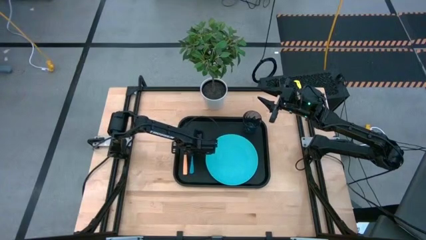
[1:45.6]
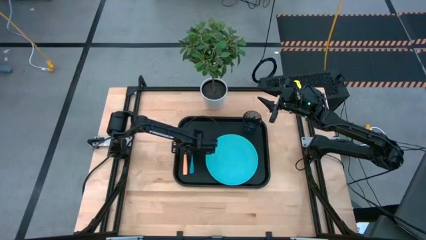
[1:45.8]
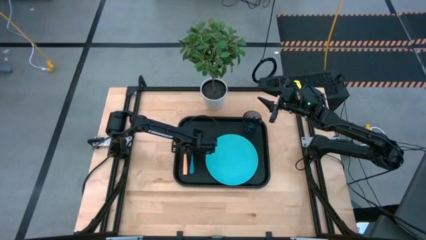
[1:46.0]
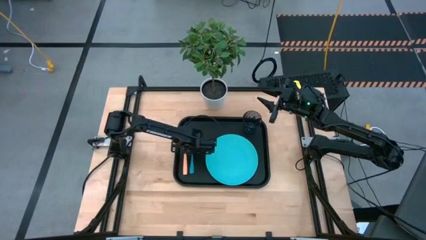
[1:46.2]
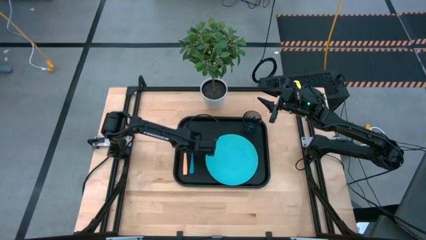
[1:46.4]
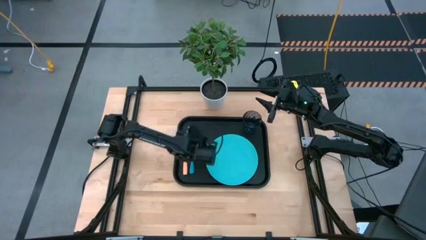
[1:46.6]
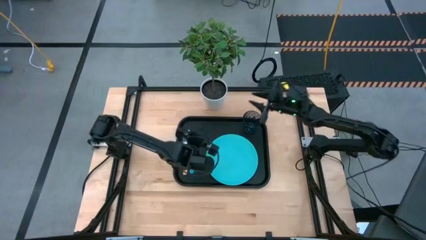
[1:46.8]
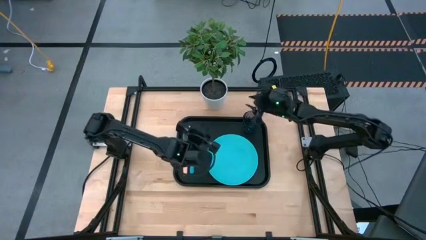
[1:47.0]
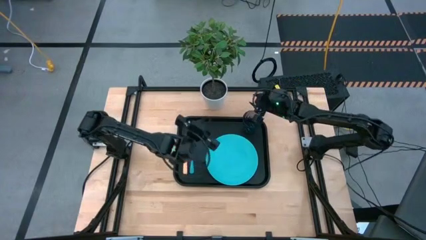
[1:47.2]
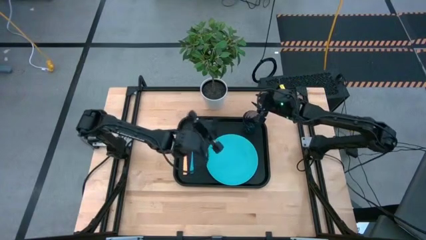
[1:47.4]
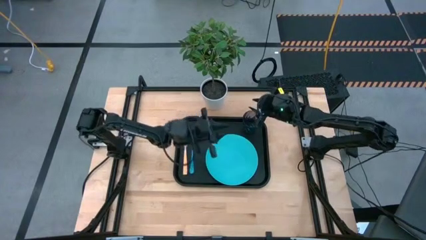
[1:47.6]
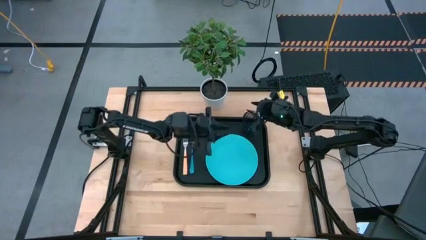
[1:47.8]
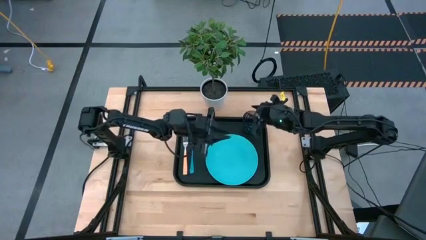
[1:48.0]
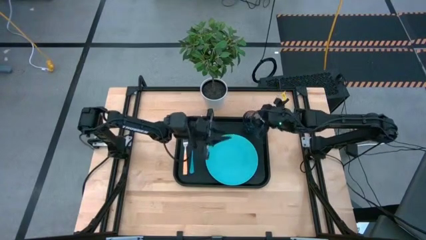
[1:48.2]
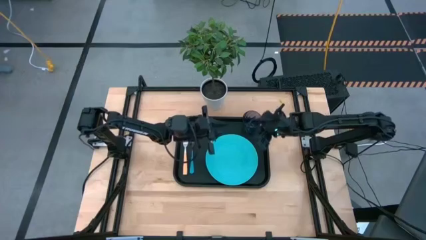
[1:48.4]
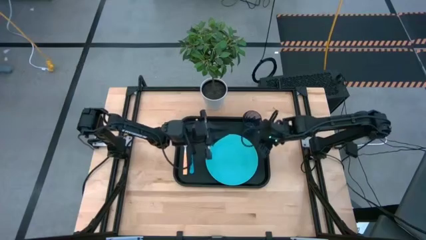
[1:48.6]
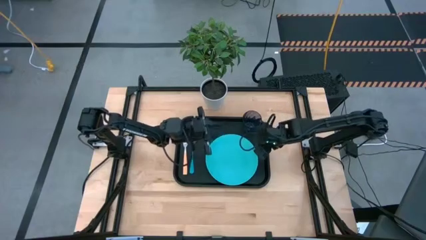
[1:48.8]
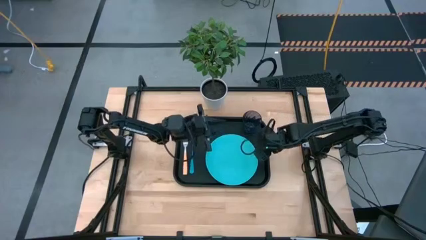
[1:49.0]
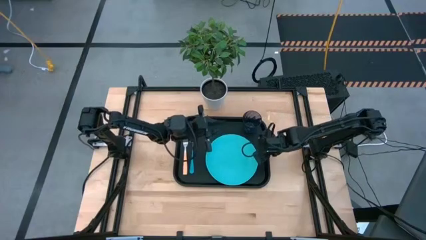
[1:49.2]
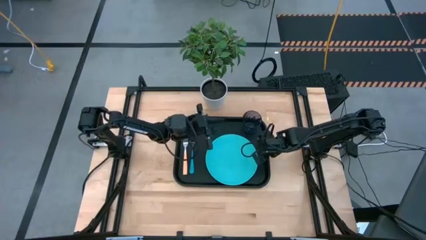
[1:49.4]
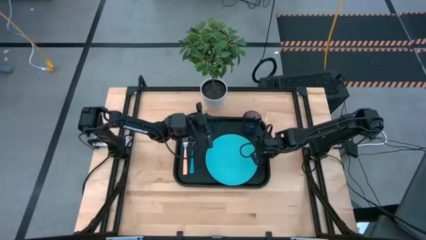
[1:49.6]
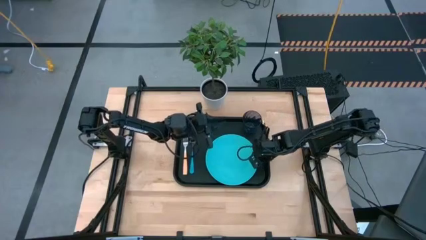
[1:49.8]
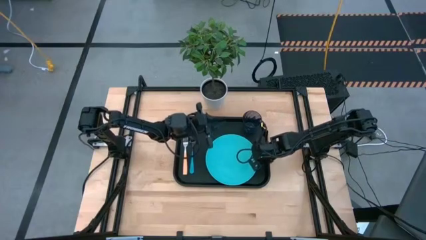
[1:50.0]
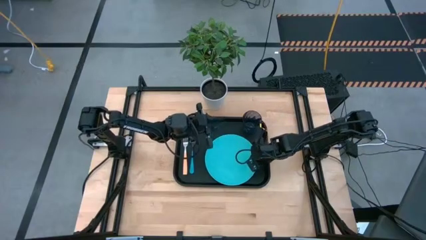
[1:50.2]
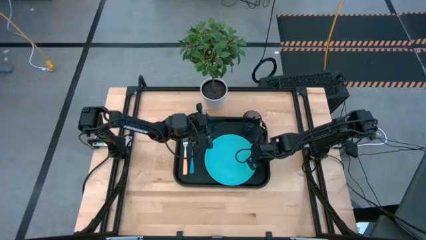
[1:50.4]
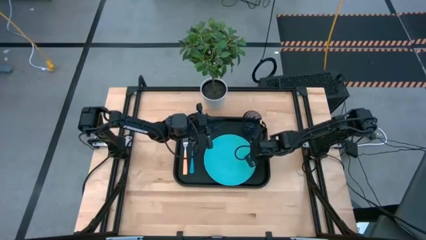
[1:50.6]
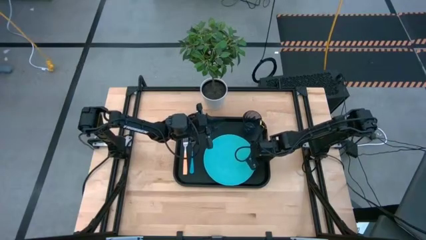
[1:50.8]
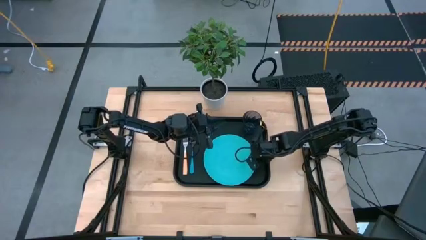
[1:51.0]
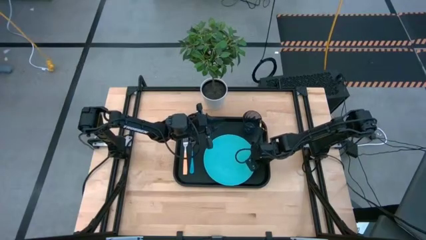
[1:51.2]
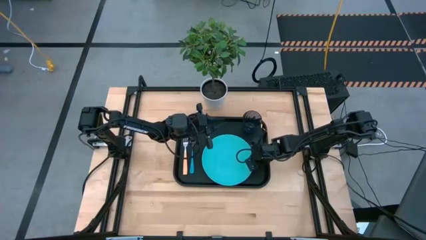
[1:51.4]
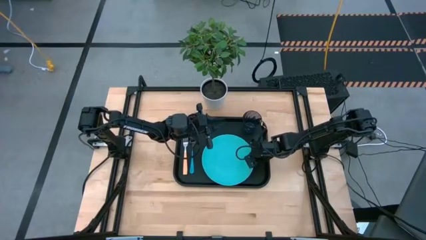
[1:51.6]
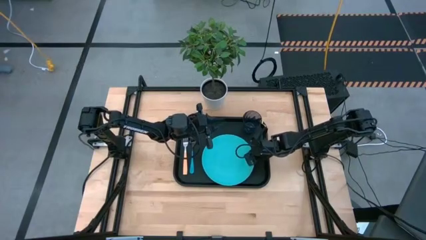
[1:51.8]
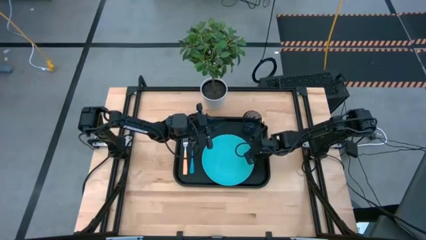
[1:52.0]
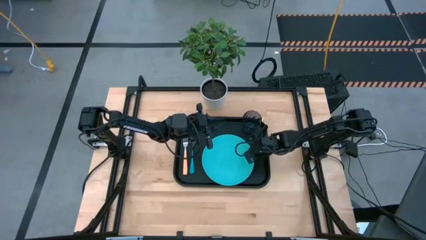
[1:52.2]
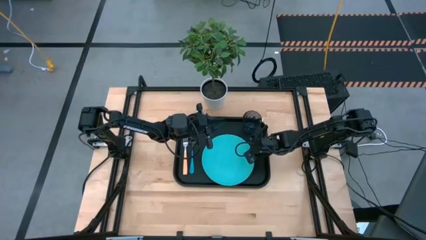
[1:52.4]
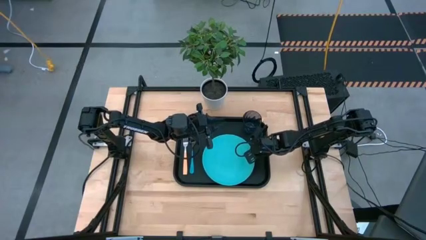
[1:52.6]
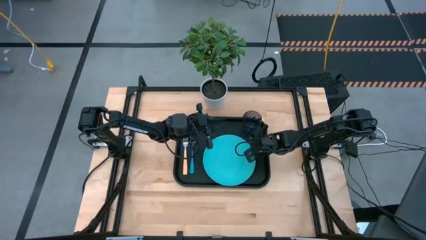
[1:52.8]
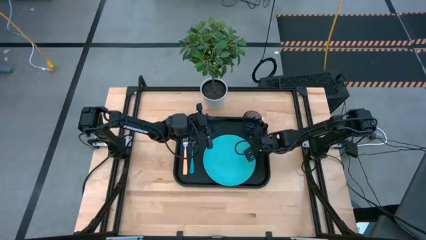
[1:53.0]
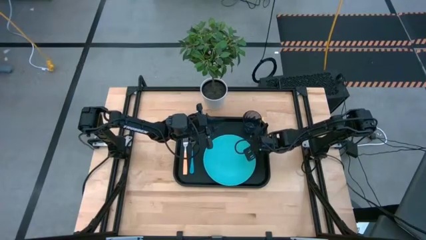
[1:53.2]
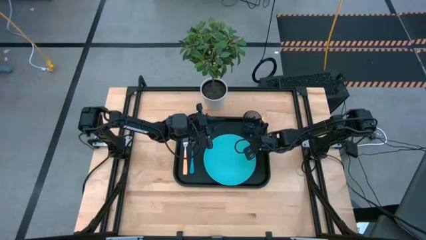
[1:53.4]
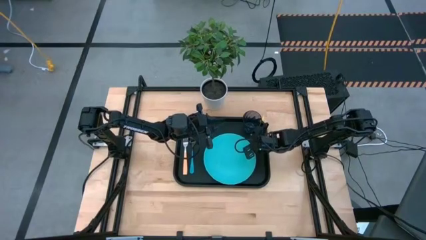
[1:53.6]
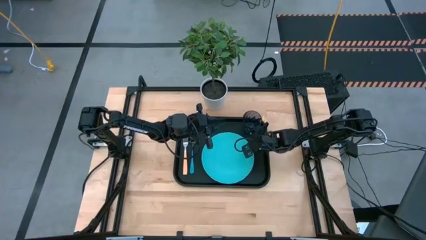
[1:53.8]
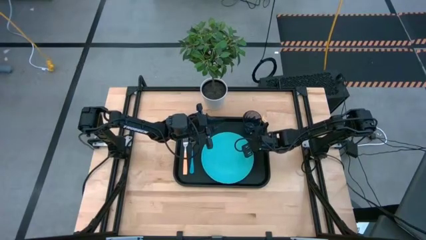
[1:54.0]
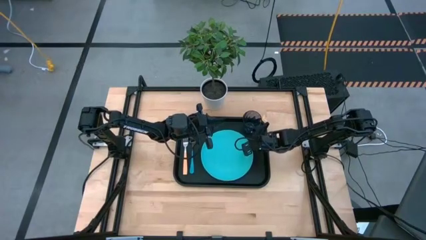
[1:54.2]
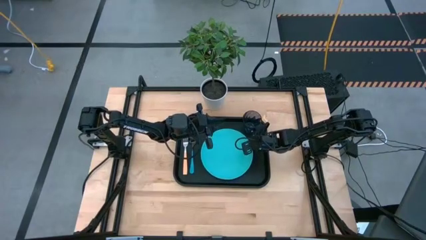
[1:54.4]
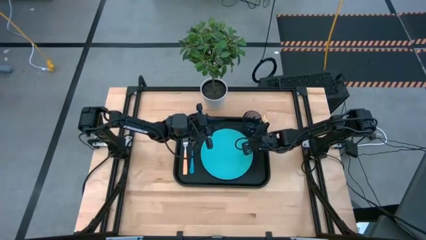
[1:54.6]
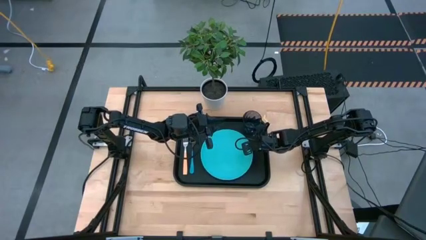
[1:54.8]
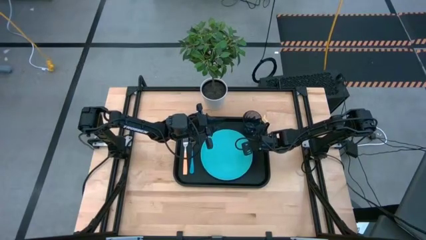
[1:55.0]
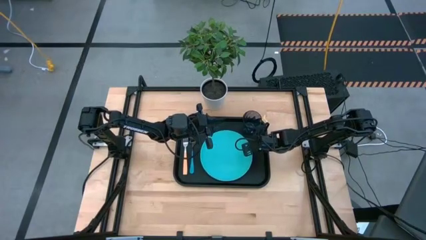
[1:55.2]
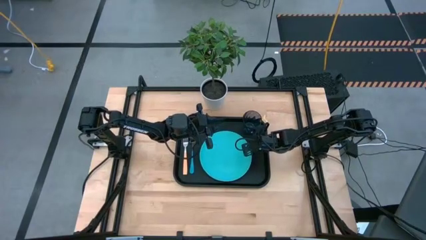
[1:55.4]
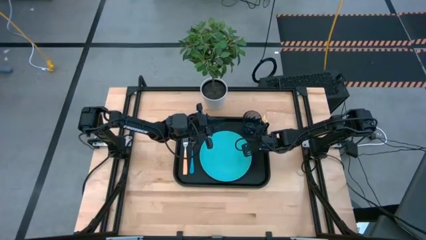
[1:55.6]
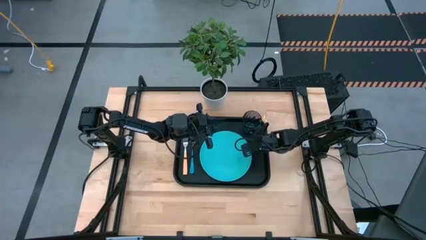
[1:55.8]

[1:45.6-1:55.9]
Task: Pick and place plate/cup/fork/spoon on tray
Adjust the blue plate on the black tray

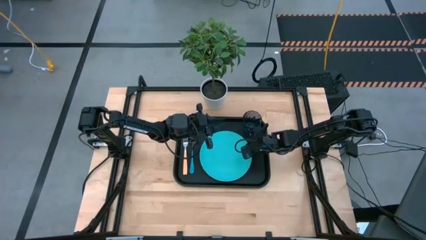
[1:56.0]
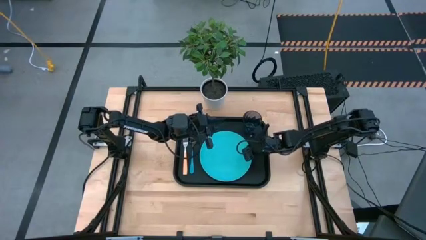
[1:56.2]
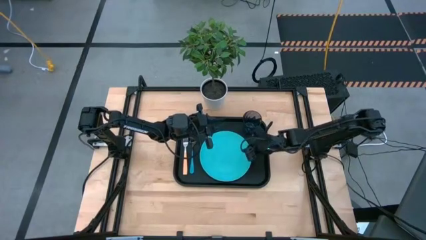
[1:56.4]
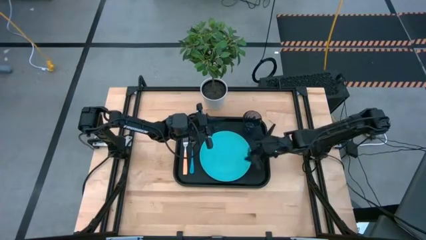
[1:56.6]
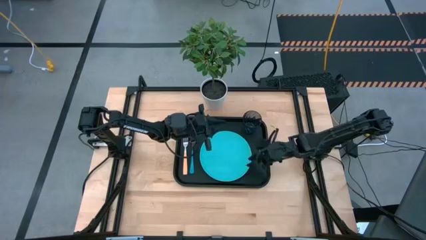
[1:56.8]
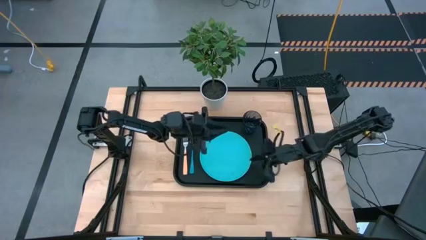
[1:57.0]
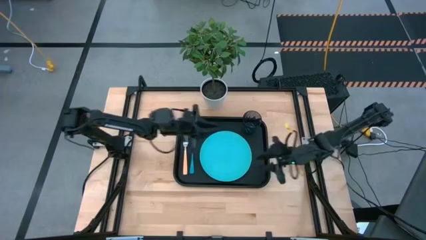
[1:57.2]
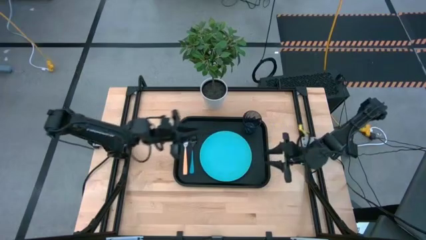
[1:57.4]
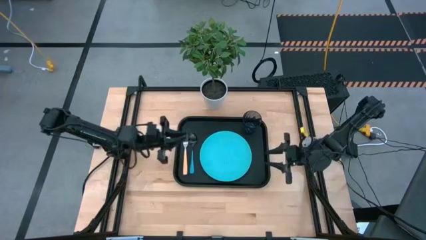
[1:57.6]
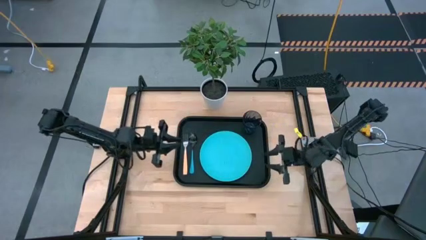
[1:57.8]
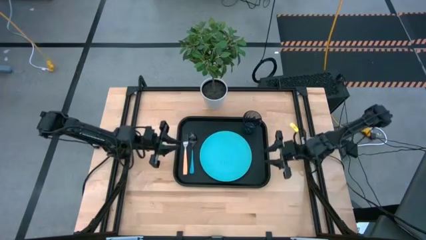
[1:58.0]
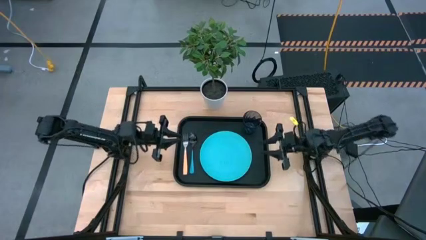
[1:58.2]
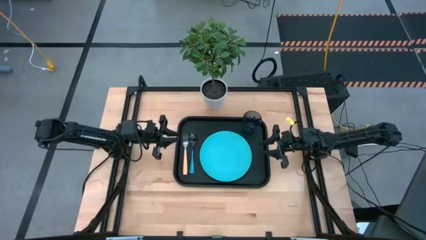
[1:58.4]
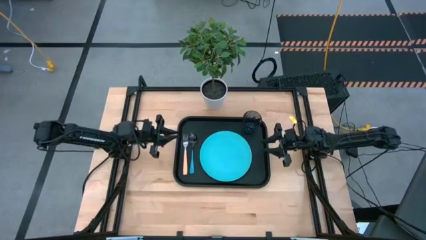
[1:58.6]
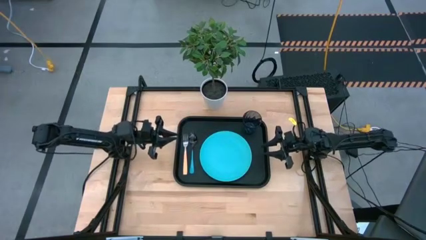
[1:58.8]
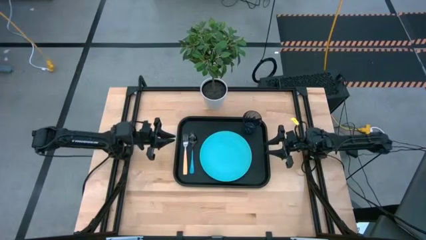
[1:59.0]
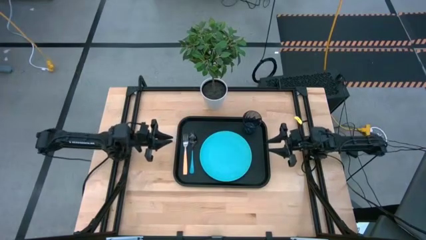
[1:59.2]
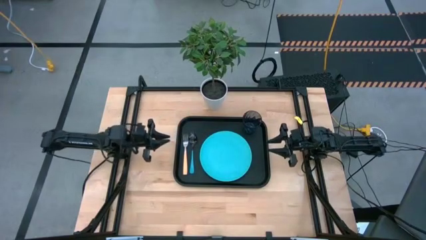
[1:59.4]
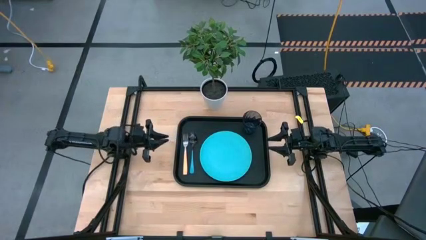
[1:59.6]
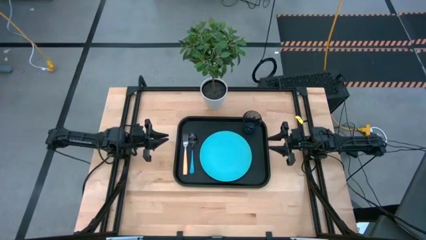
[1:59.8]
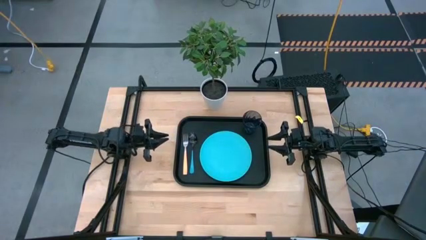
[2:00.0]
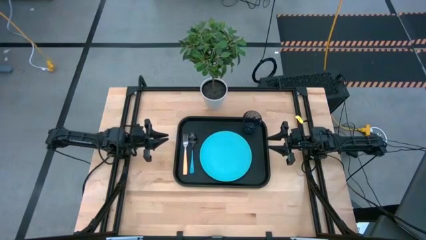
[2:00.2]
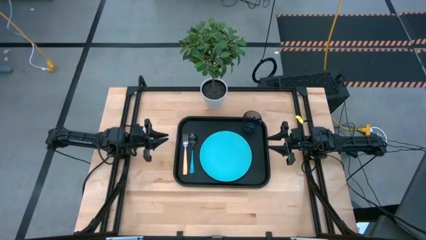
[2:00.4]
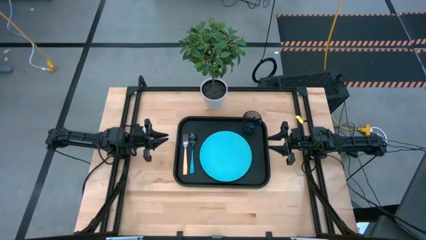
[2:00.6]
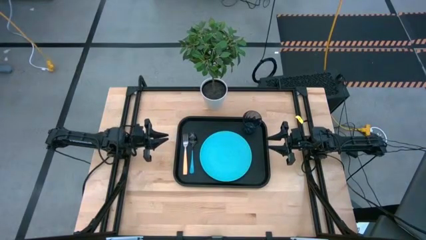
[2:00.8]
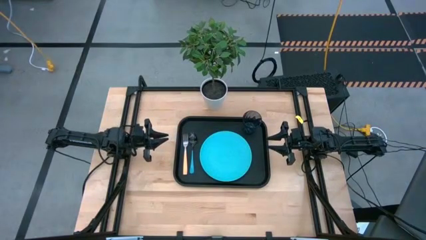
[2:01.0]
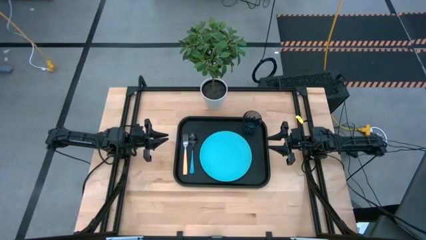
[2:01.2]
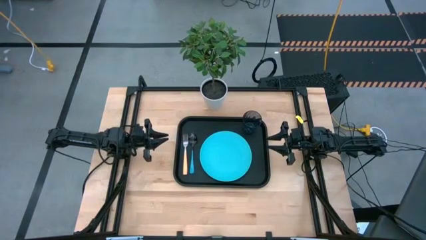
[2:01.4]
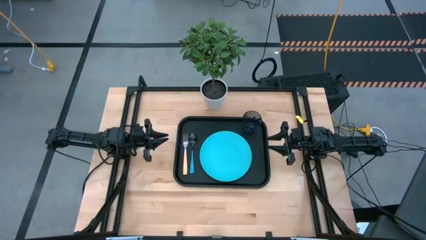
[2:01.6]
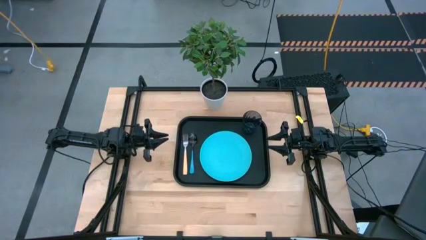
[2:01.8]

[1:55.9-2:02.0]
Return to Home Position

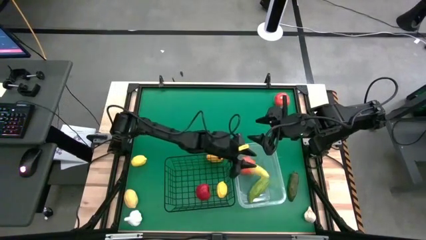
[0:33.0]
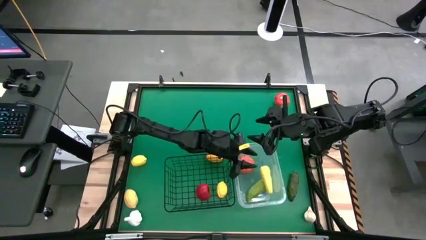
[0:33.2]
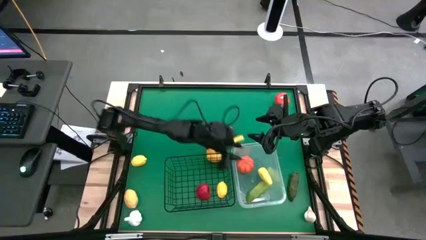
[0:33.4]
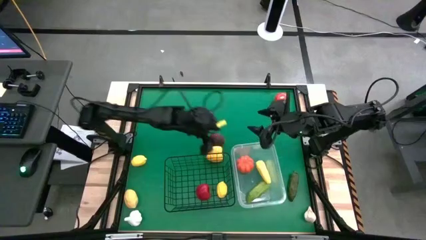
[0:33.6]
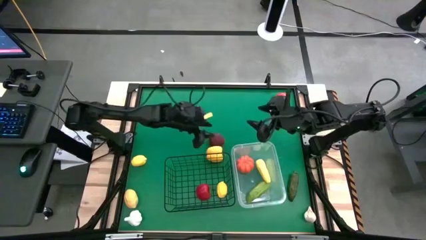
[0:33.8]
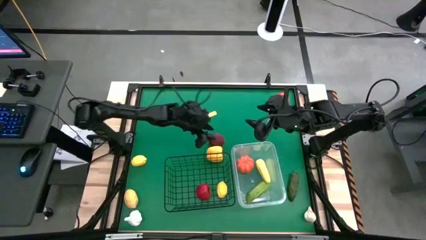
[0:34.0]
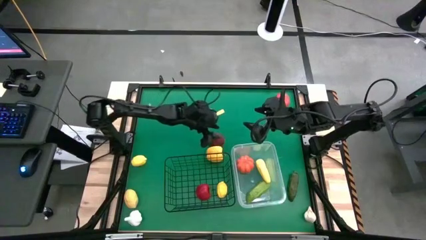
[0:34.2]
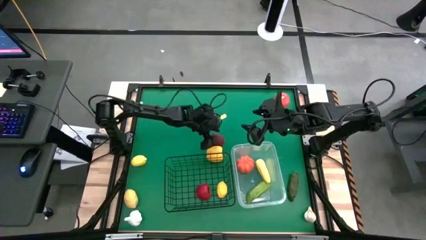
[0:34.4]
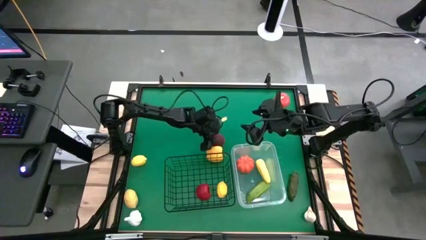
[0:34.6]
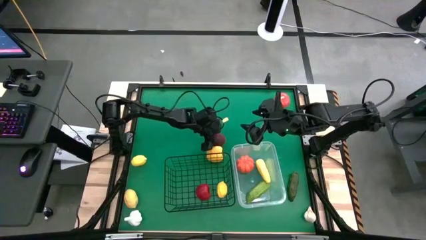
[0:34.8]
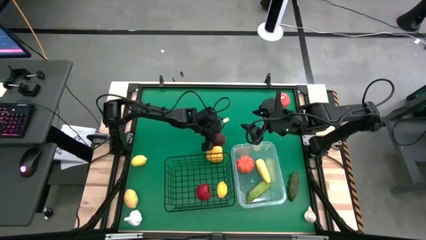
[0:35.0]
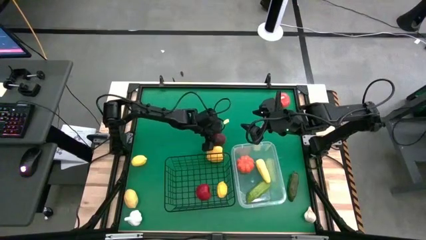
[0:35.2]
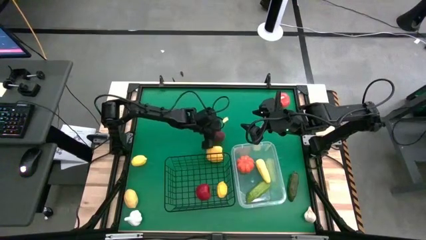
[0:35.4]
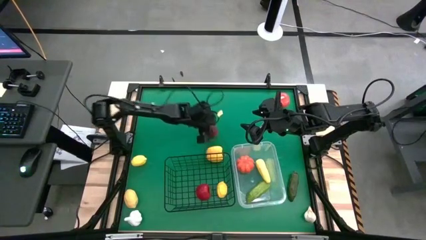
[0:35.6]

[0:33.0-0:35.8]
Task: Sort produce into baskets
Put the apple into the wire basket
